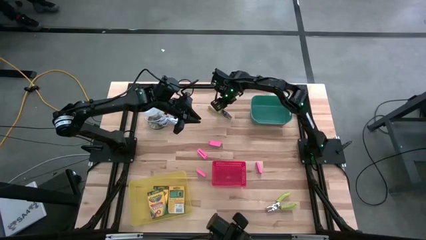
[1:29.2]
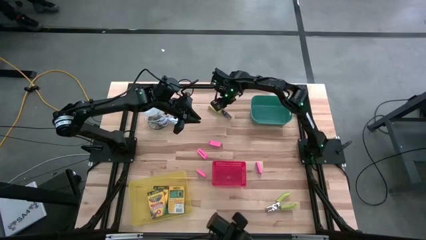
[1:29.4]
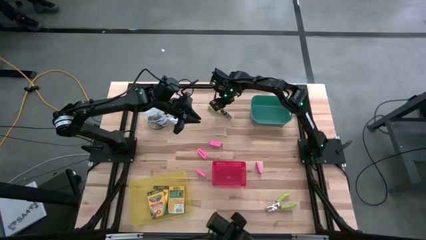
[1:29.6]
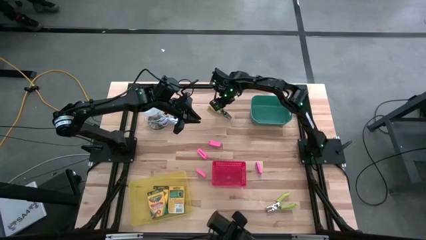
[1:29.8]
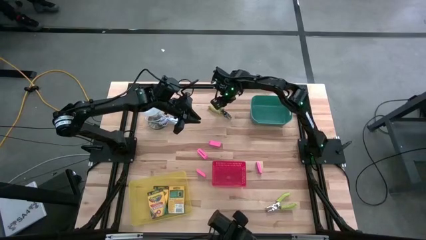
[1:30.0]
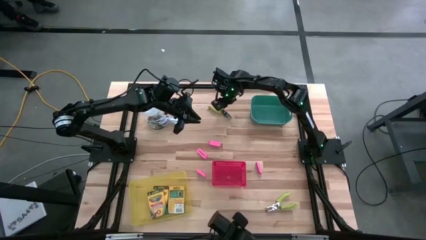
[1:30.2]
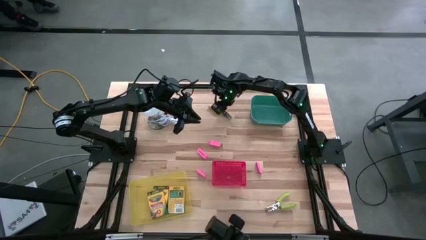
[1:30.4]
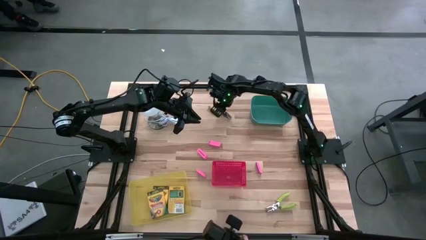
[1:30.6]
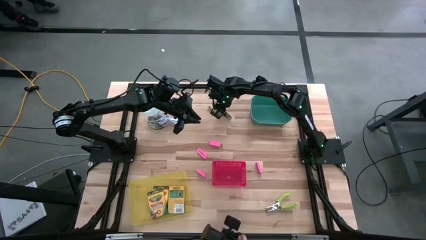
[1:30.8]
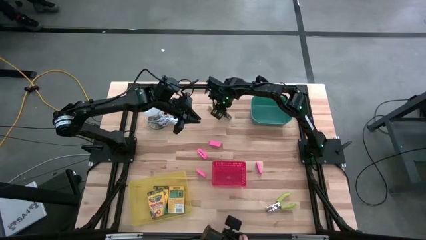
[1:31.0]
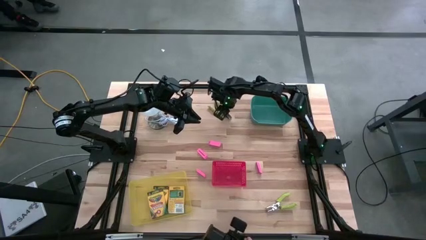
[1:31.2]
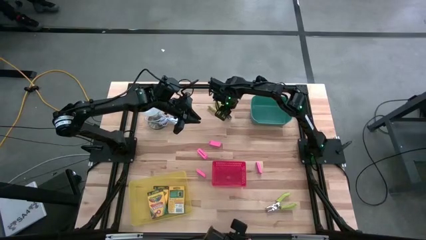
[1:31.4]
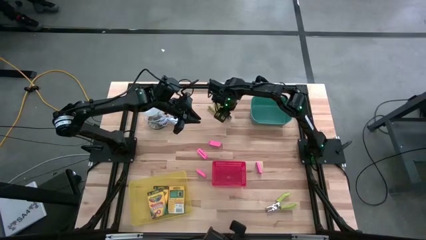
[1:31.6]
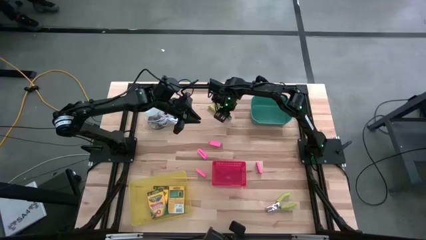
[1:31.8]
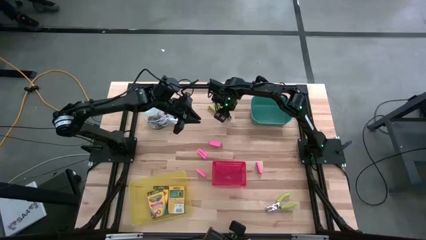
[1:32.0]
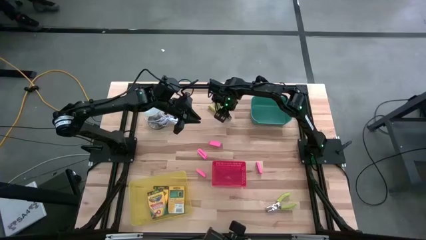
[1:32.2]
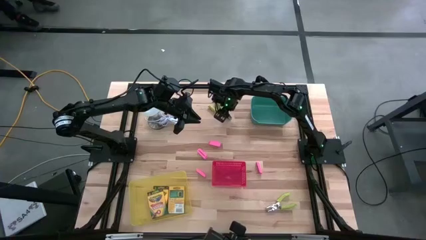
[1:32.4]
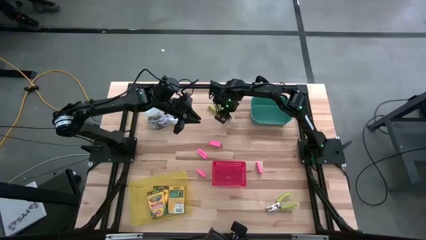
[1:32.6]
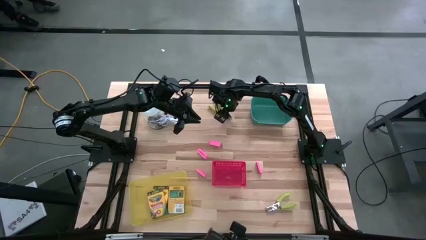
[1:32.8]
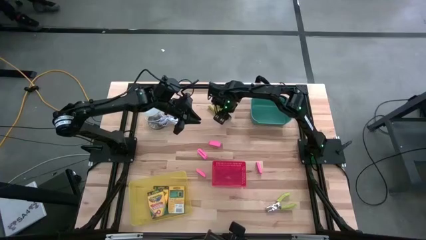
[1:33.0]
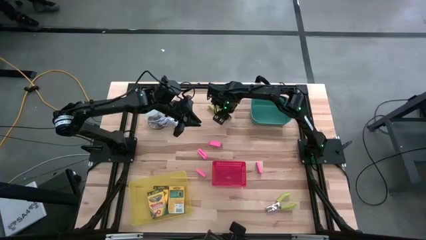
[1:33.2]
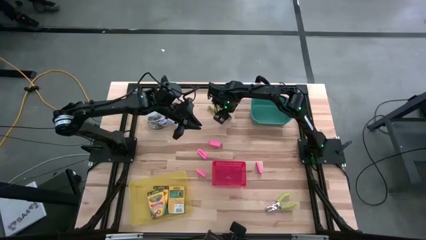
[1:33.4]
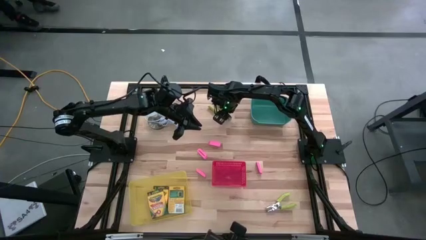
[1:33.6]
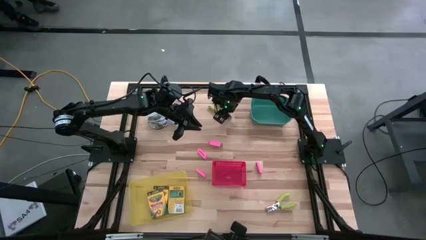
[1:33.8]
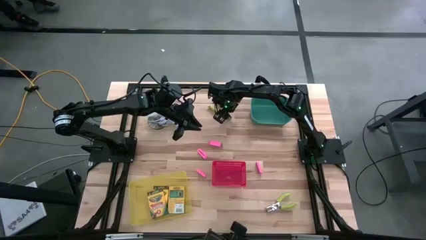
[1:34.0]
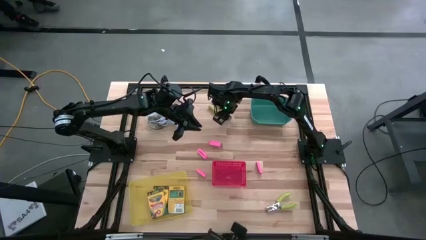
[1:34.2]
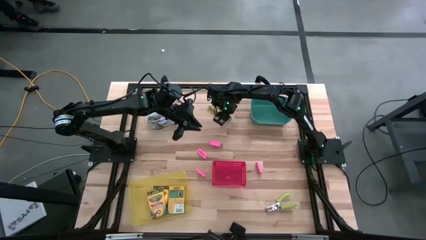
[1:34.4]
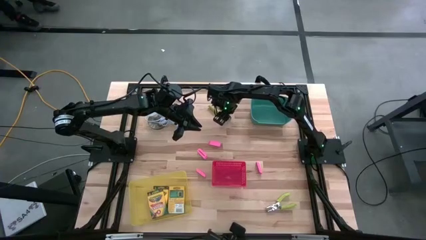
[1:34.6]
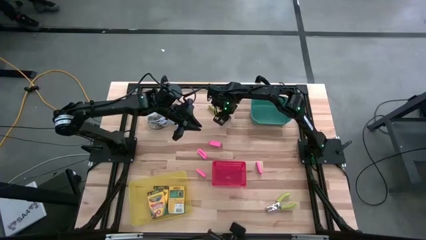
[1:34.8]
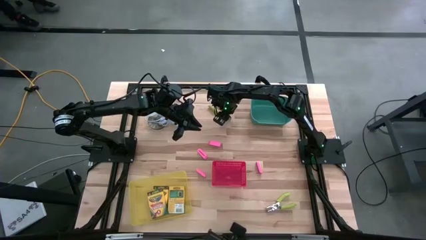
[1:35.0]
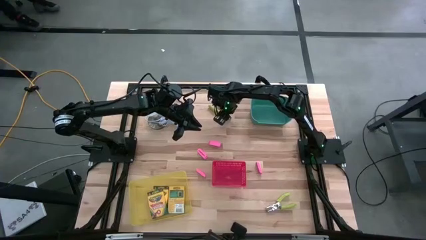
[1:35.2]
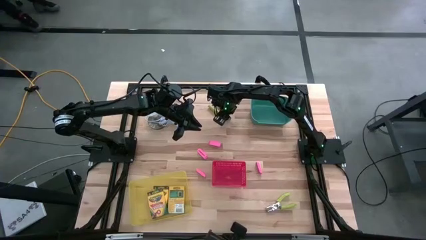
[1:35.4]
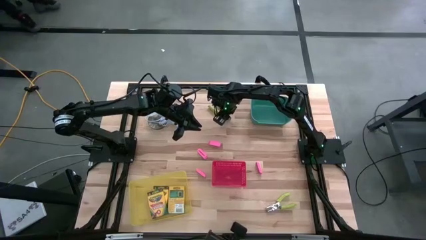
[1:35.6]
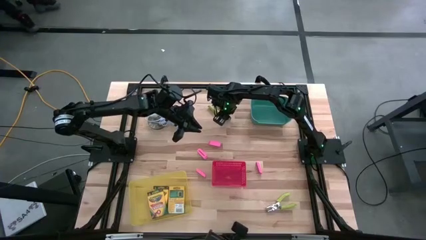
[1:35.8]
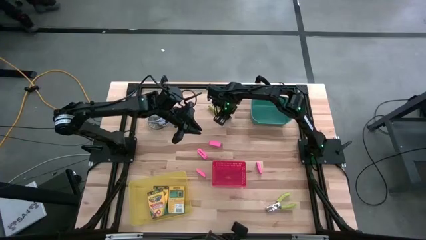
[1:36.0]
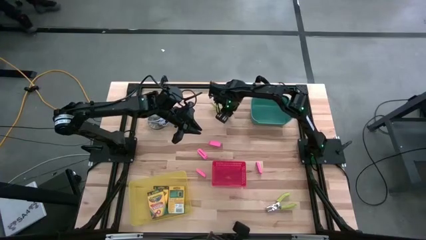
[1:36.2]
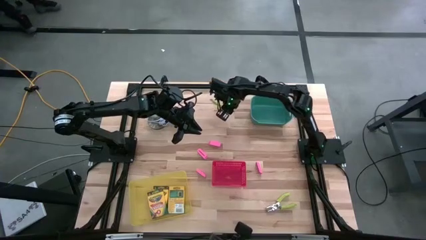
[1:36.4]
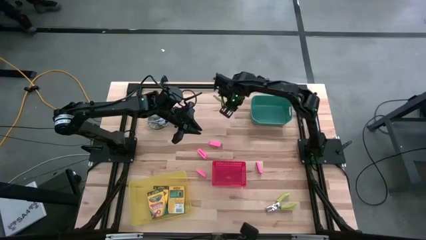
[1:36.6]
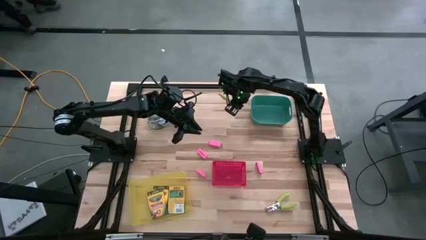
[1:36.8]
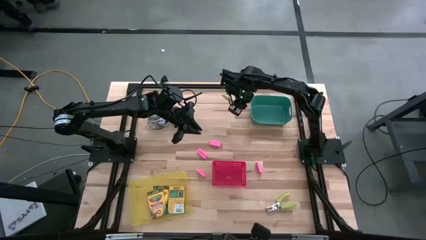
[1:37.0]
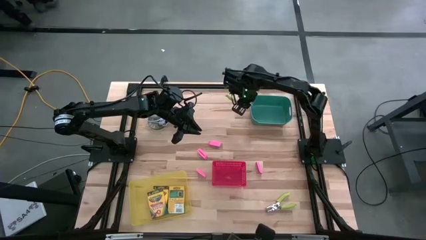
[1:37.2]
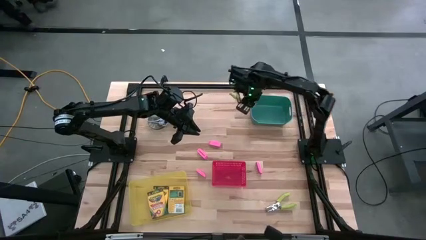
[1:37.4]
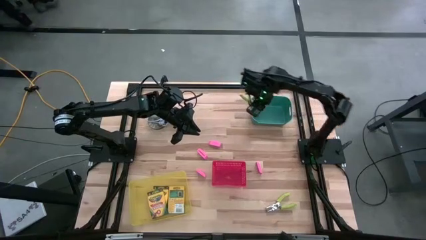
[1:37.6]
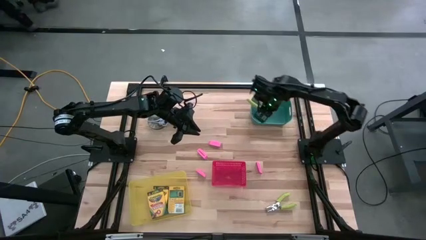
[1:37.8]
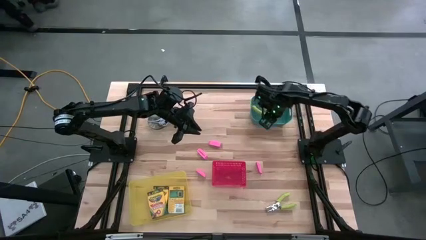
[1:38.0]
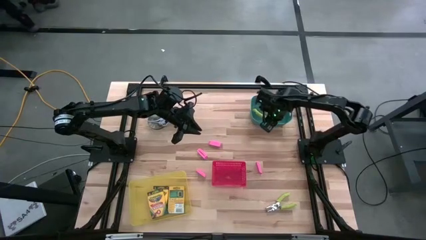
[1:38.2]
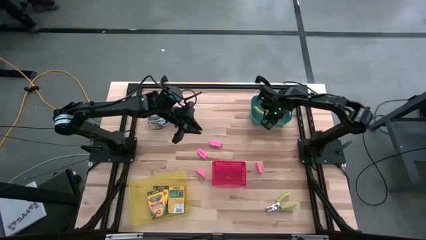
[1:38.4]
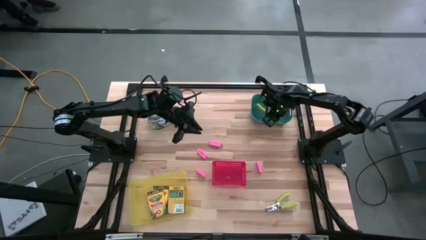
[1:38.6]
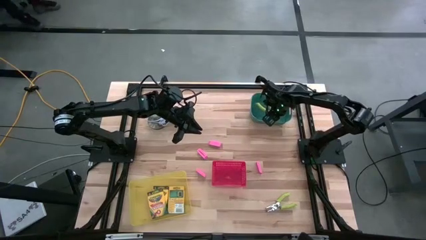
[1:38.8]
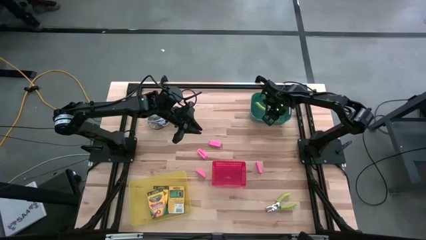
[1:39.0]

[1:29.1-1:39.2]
Task: Pick & Place School Supplies
Put the top bright green hole punch into the green bin

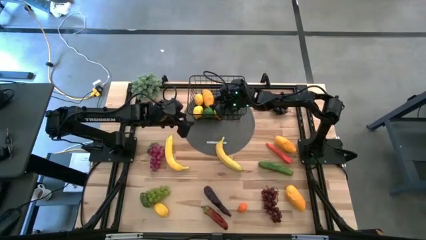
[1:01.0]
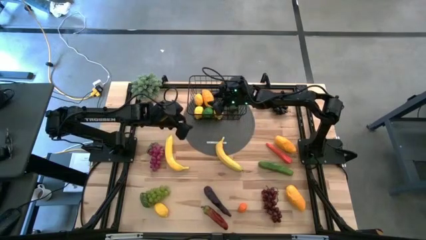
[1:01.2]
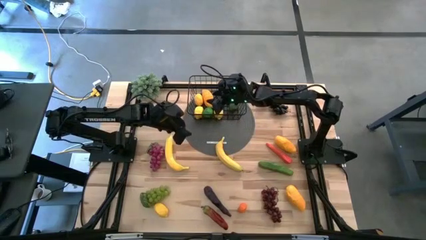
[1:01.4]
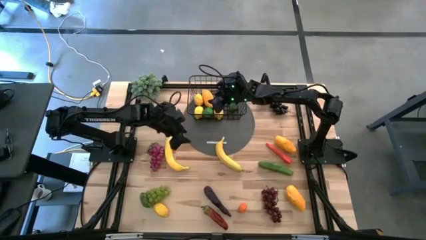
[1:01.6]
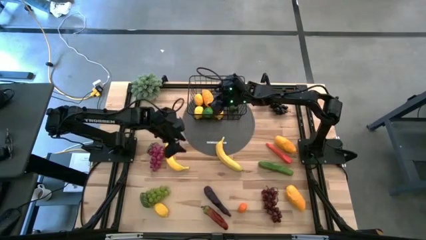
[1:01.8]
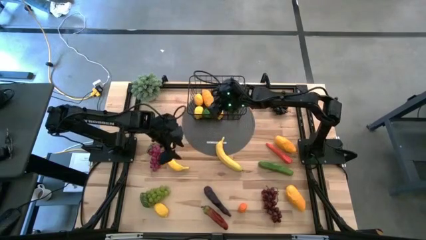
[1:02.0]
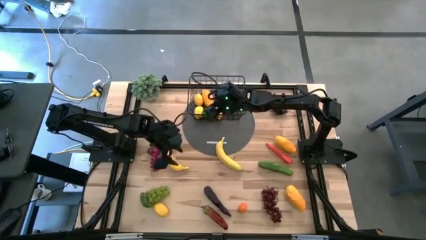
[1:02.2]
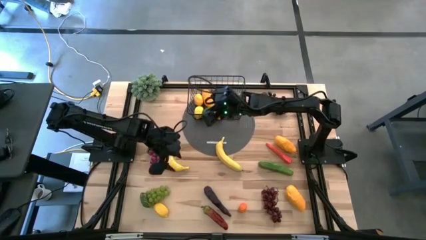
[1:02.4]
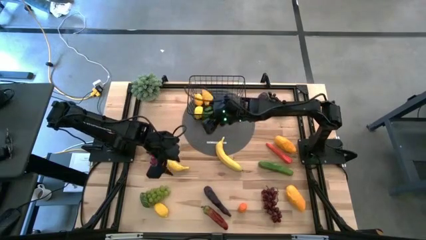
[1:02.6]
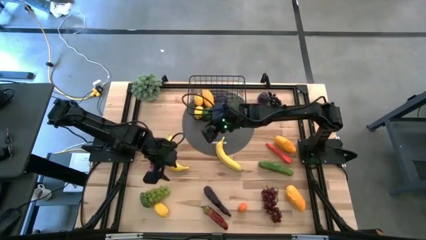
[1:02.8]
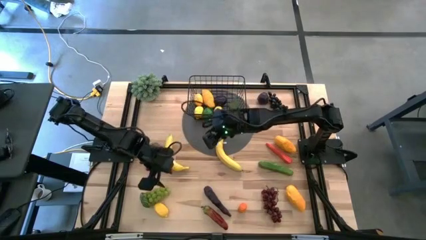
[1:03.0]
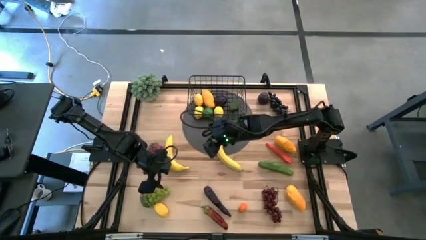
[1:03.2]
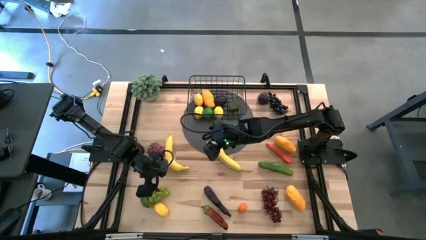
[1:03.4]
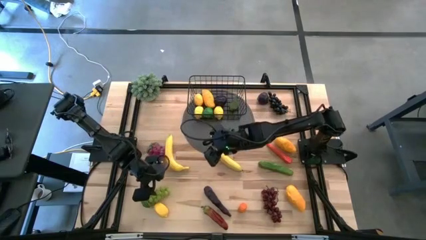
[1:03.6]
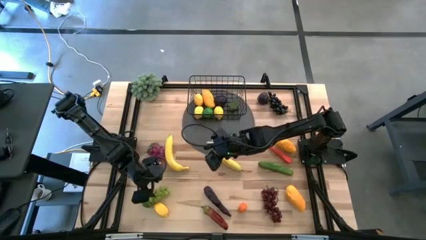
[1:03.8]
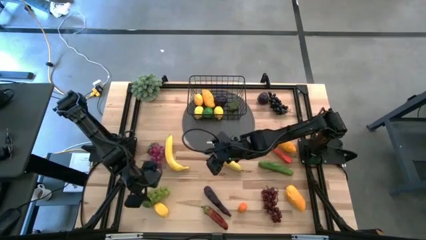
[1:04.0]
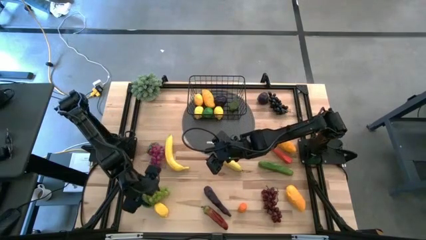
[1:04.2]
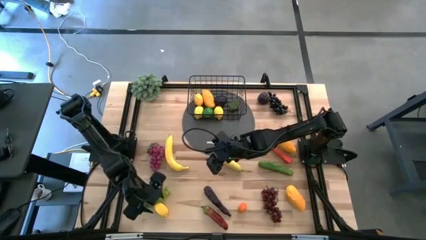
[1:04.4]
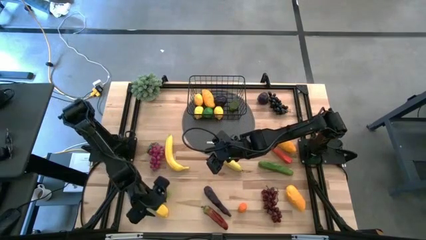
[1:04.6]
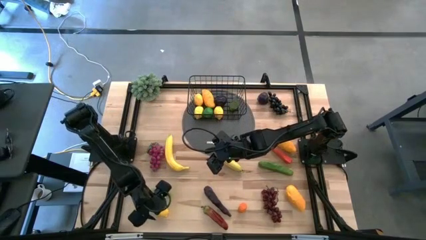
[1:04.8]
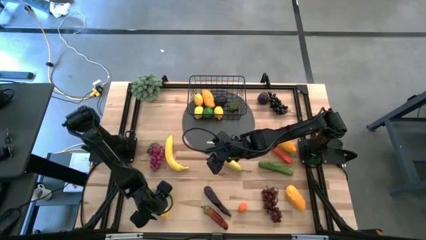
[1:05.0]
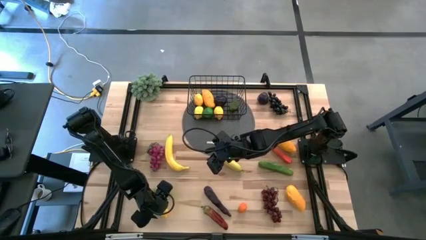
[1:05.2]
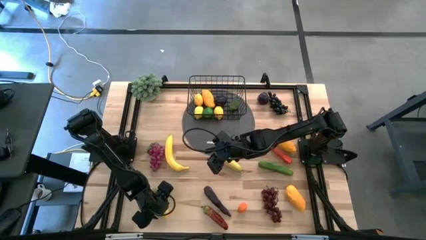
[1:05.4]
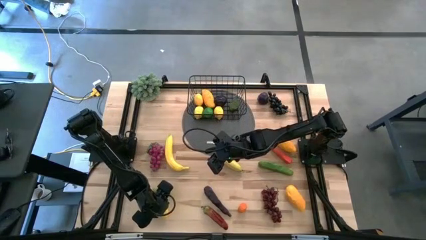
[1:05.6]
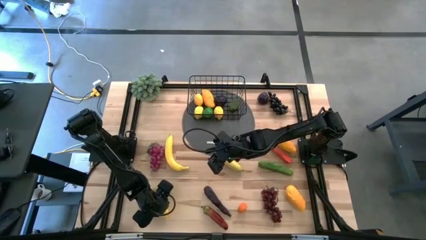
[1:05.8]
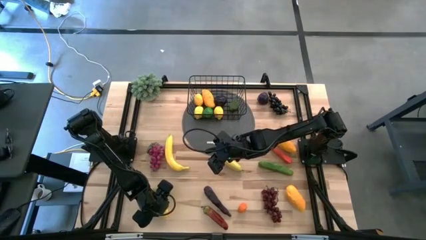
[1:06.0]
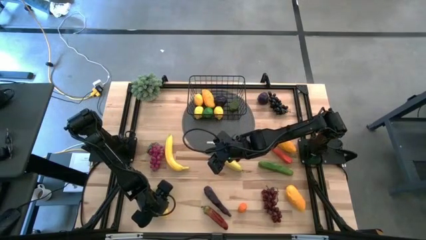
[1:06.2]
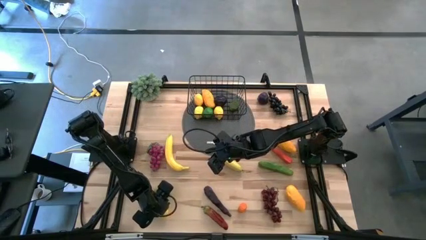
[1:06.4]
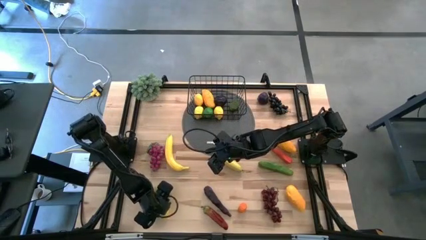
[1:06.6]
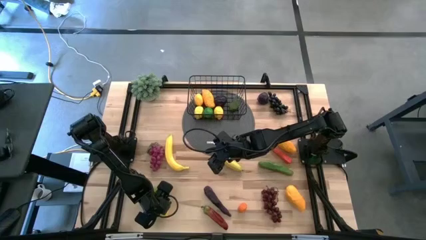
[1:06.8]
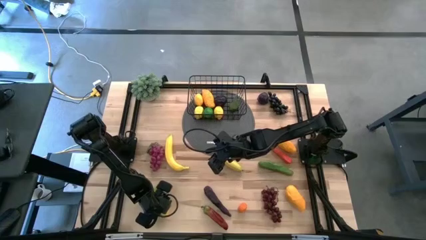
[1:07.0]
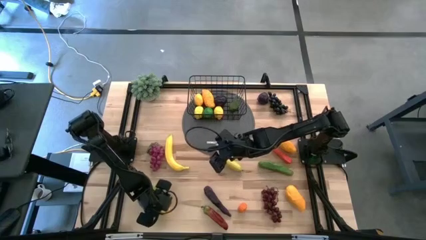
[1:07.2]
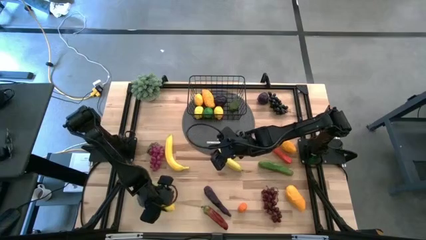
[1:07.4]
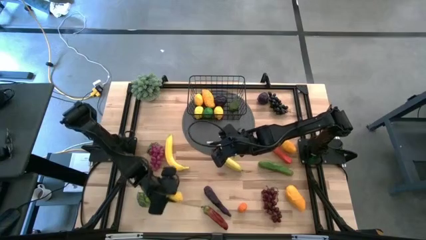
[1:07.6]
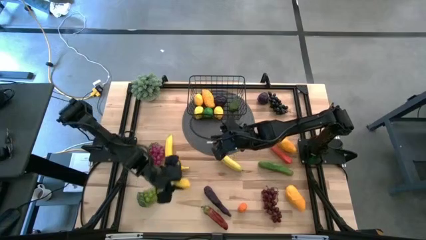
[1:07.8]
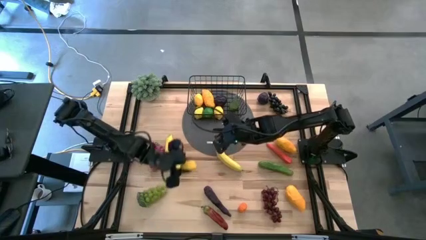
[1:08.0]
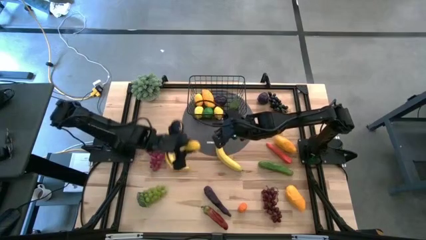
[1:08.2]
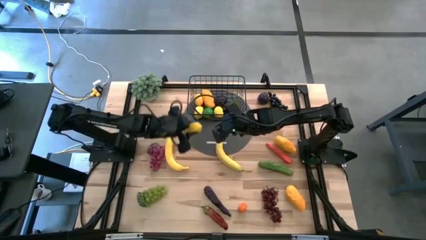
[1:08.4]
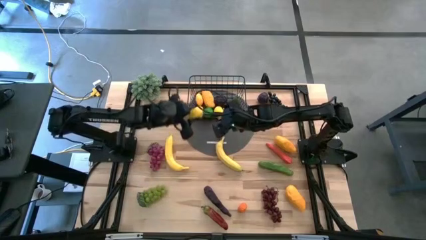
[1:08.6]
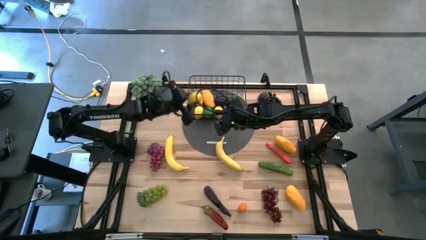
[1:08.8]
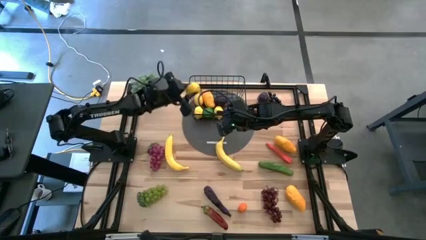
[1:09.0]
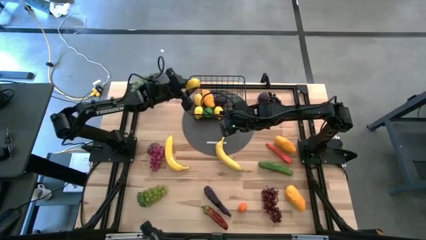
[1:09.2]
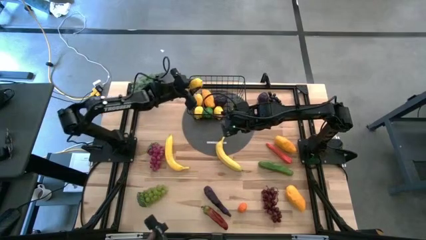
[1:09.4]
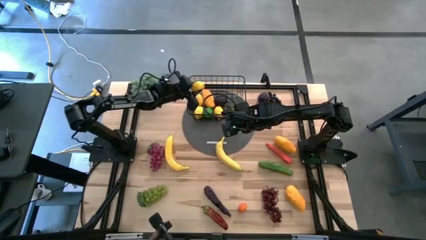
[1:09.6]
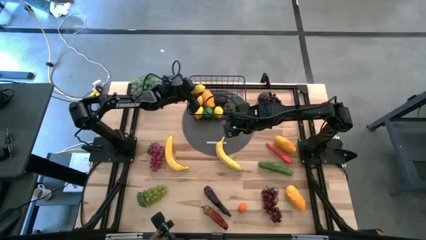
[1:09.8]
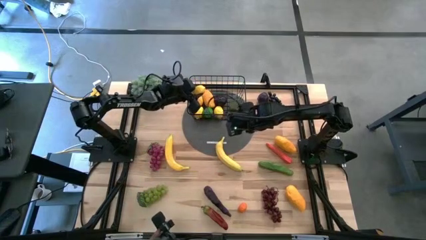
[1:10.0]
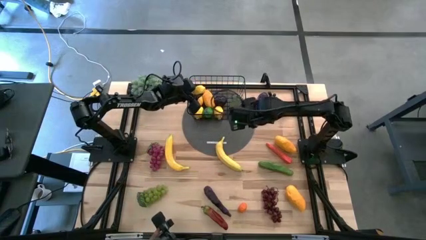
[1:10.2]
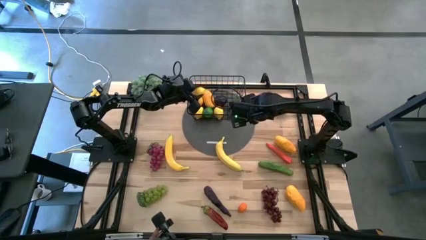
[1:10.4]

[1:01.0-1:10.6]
Task: Build produce basket
Put the yellow lemon into the black wire basket
